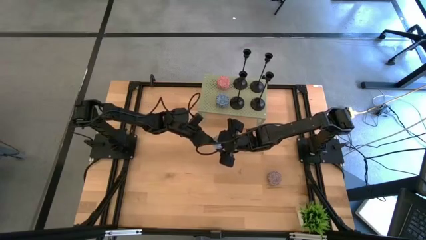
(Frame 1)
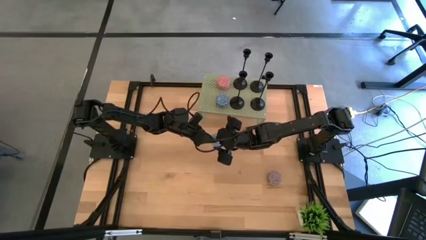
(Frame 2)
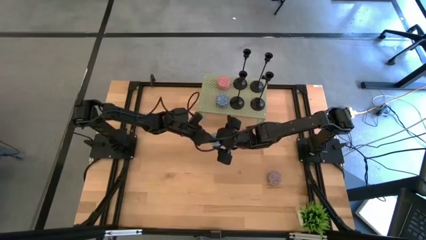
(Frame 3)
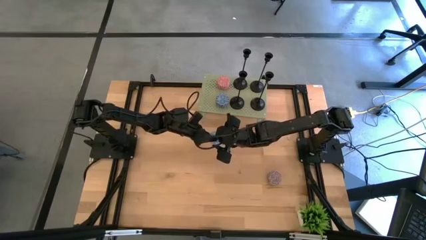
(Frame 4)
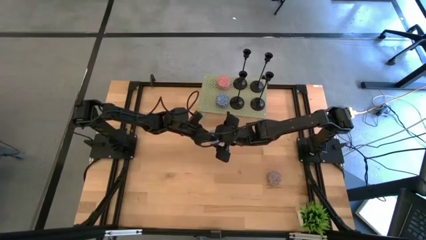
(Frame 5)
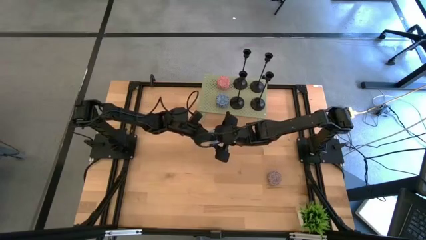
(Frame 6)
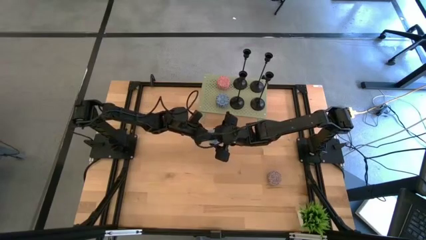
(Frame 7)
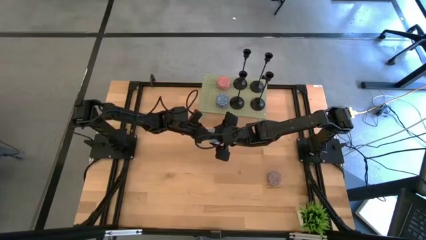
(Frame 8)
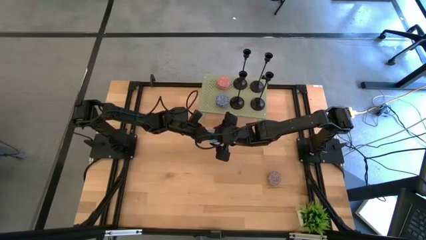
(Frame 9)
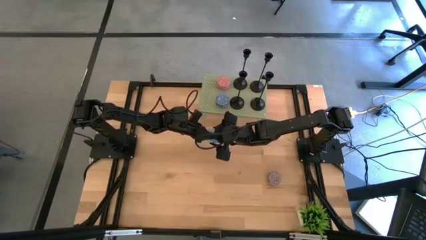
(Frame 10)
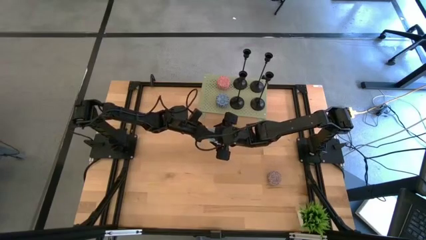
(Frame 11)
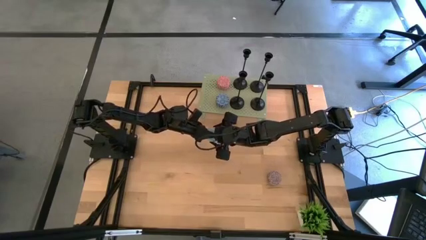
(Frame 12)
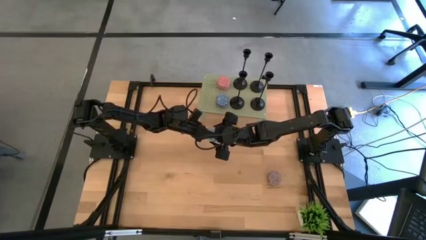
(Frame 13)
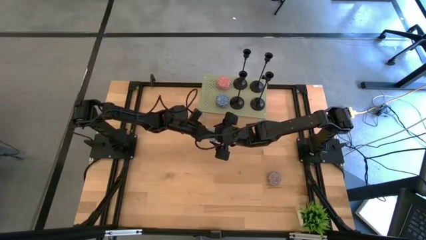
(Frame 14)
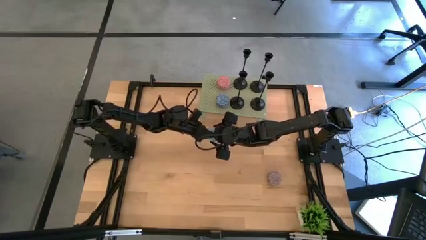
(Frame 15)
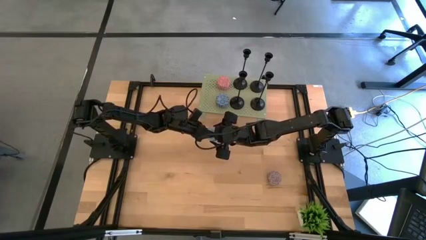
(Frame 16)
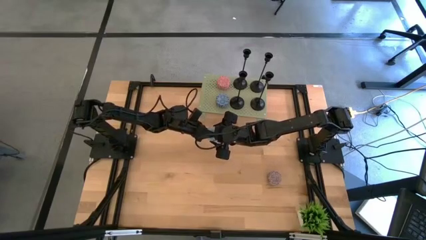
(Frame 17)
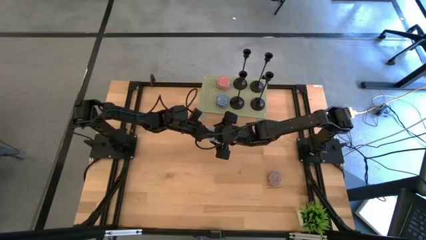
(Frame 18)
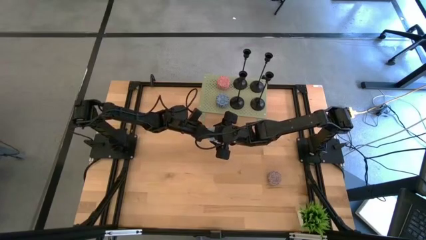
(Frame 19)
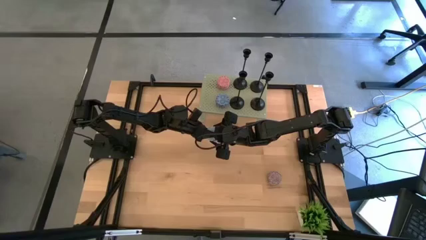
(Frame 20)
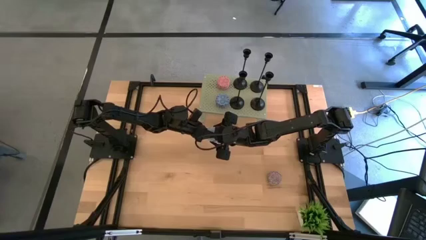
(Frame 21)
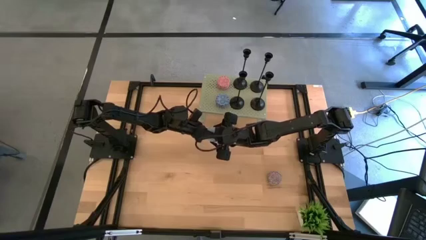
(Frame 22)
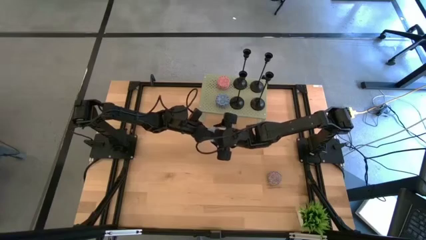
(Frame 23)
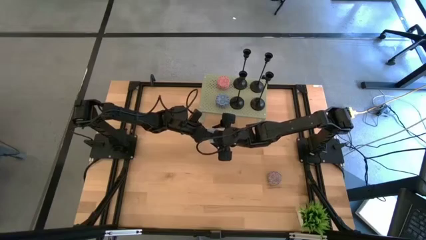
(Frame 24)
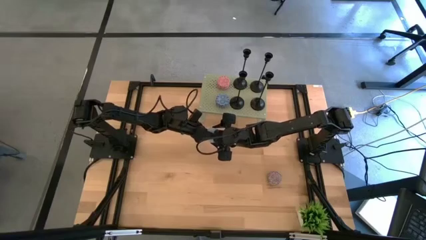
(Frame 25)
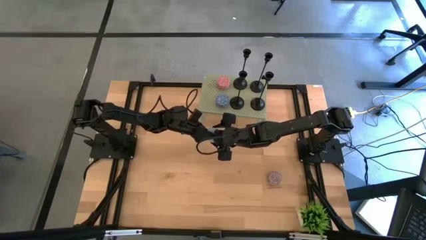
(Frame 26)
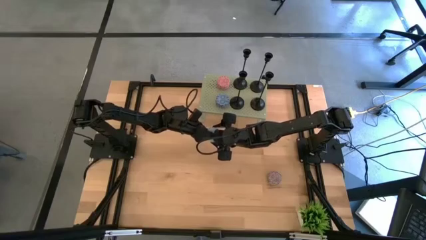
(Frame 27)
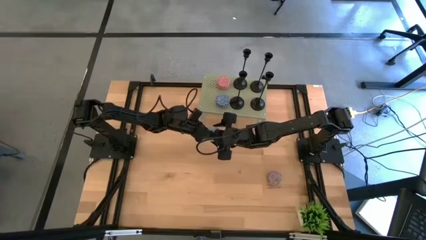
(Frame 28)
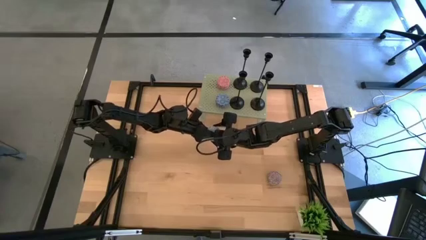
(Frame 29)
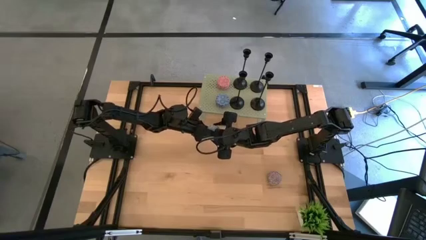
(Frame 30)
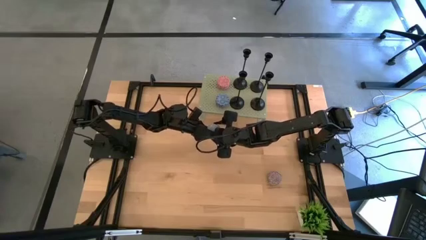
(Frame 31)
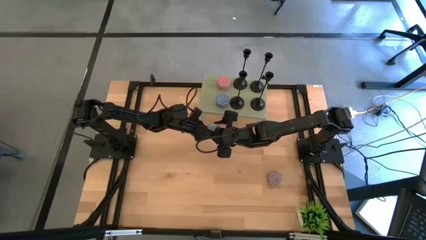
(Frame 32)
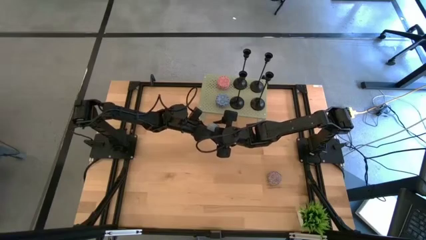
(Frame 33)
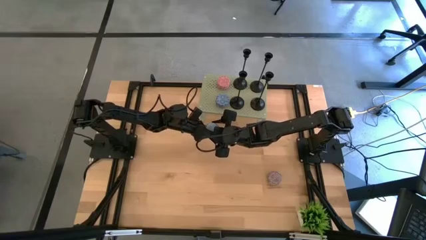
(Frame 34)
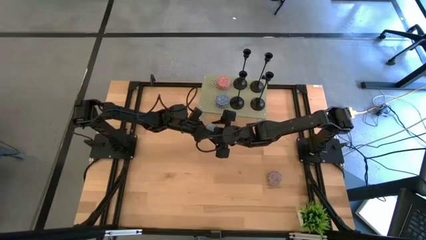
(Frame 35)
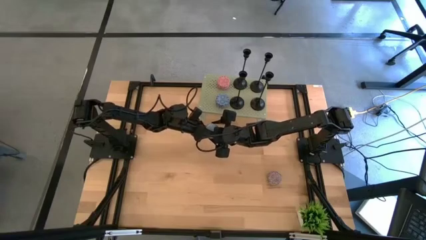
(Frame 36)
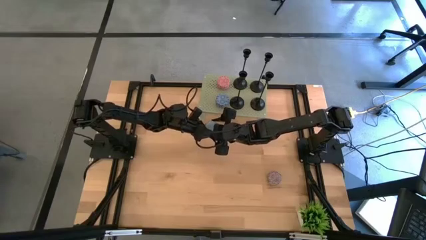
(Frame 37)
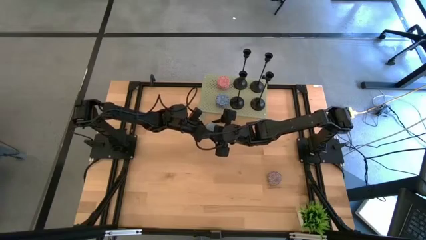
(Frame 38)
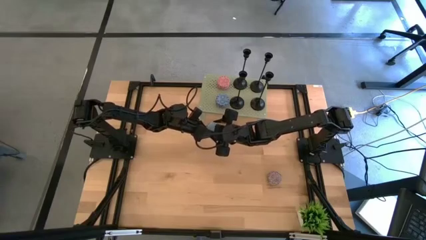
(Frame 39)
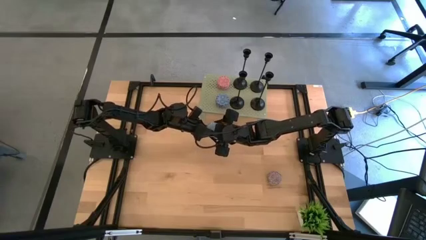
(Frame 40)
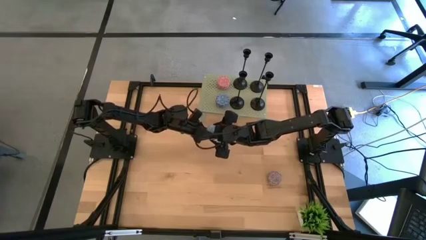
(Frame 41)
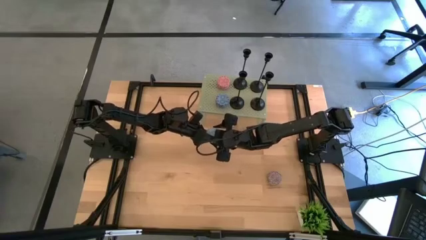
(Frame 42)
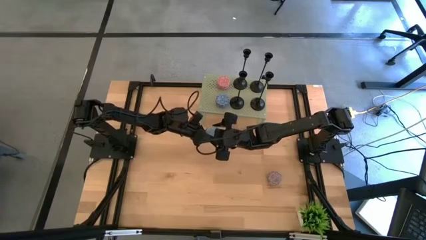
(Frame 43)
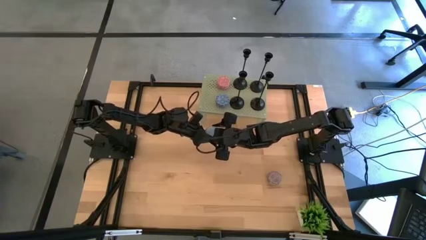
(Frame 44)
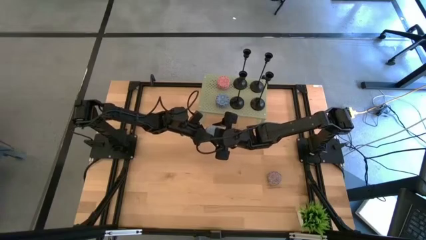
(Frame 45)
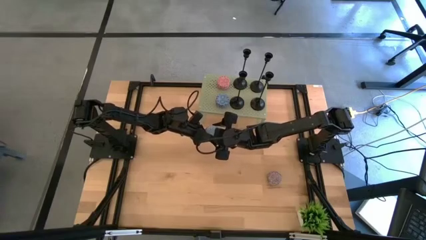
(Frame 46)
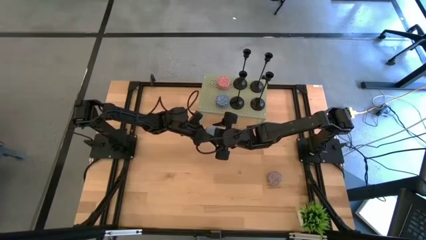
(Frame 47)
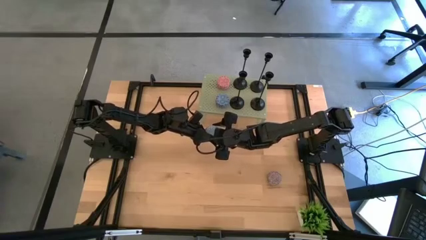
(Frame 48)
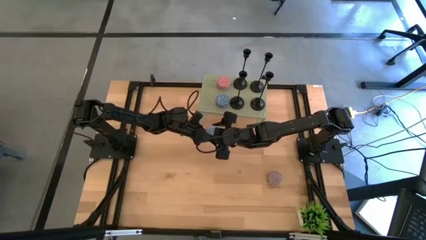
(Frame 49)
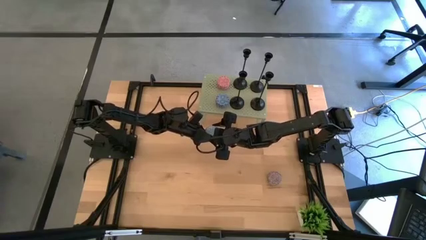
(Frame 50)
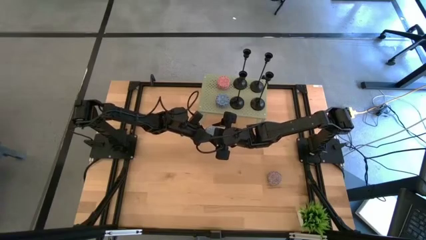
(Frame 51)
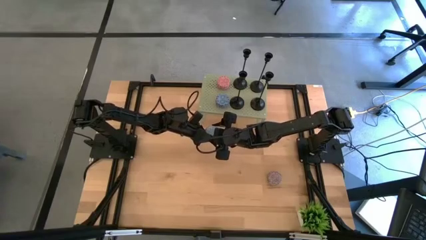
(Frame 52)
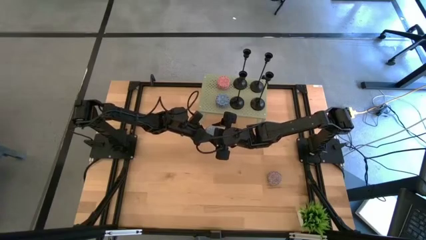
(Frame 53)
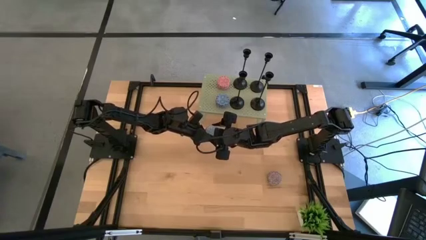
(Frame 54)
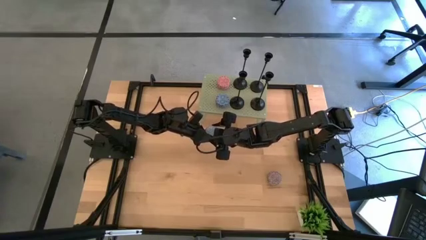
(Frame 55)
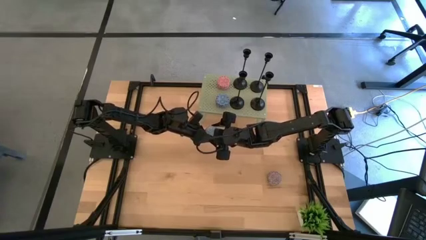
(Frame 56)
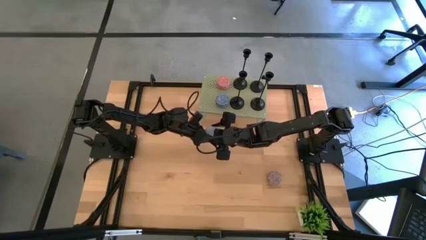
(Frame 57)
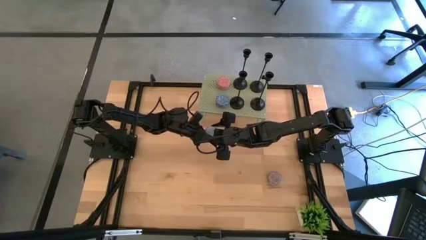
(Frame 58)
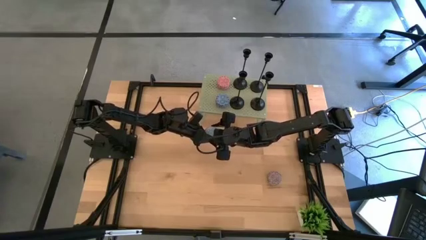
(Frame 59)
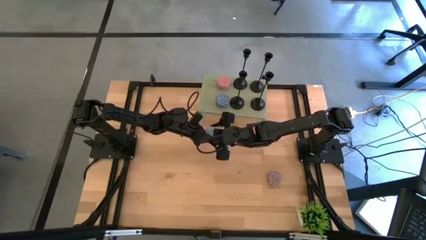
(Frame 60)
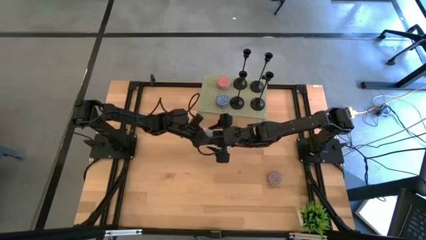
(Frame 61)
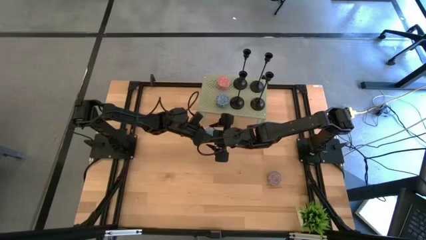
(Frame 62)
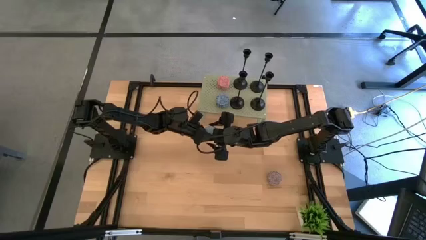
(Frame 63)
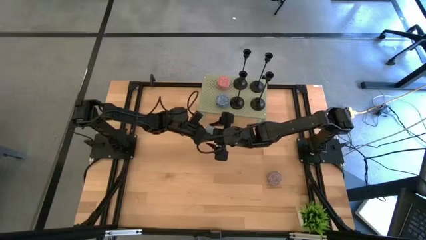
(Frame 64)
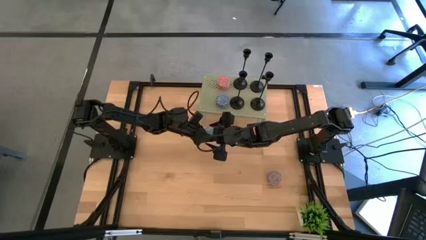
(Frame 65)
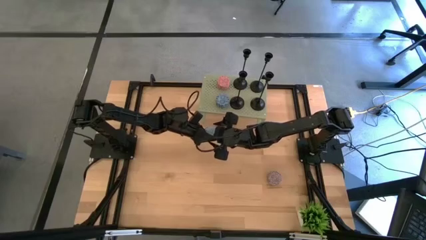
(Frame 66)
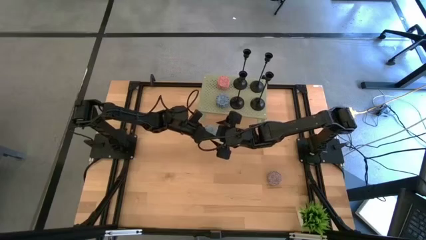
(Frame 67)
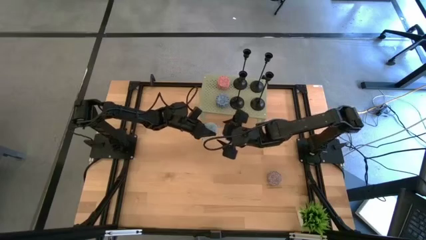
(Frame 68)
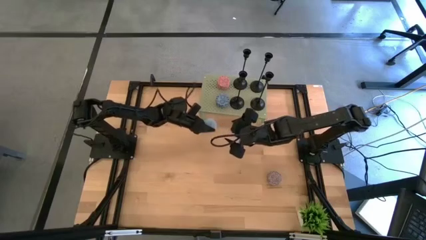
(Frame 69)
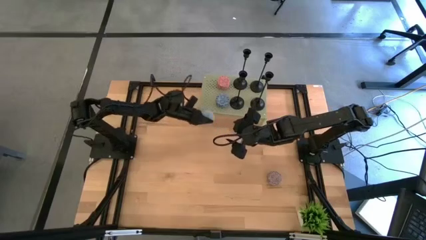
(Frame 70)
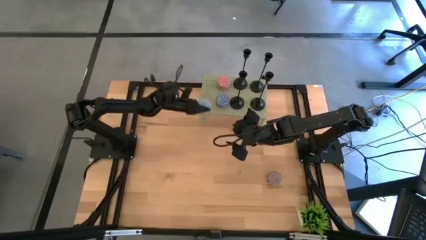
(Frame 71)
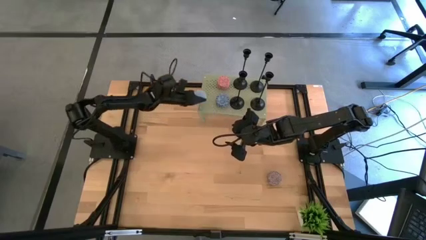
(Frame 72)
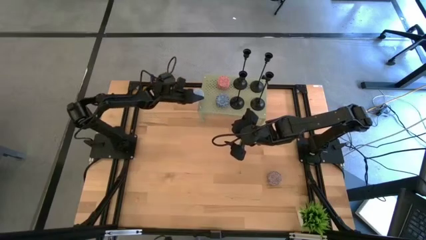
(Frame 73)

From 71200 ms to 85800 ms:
Task: Pick & Place candle stick holders
Put the blue scented candle on the shelf

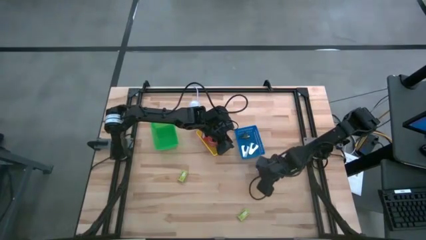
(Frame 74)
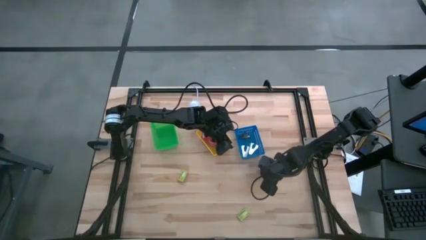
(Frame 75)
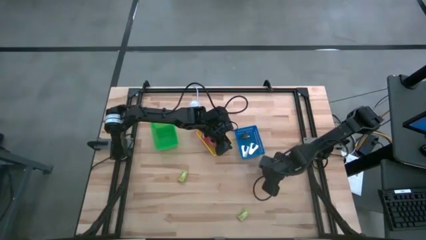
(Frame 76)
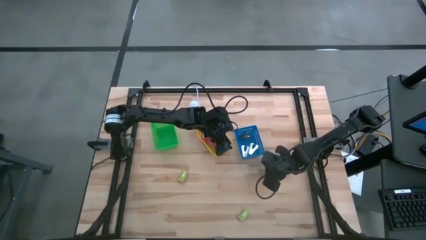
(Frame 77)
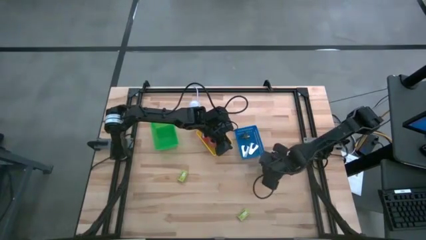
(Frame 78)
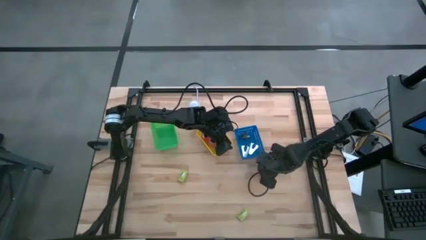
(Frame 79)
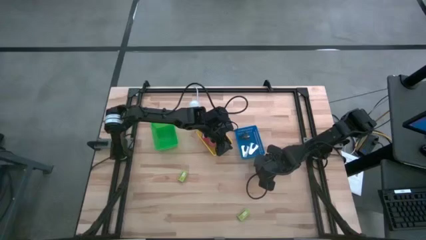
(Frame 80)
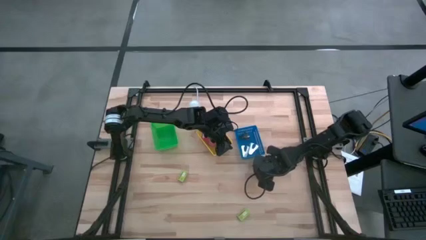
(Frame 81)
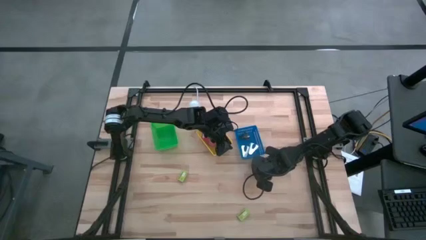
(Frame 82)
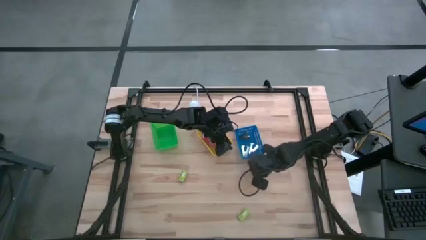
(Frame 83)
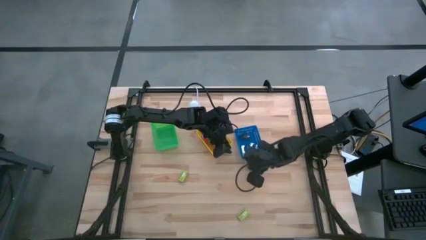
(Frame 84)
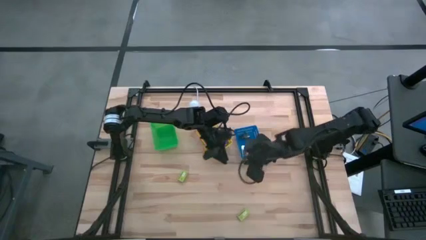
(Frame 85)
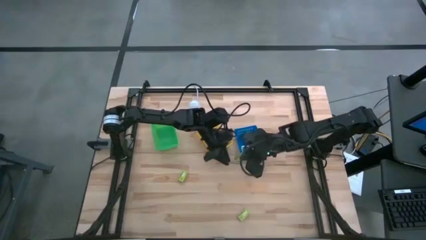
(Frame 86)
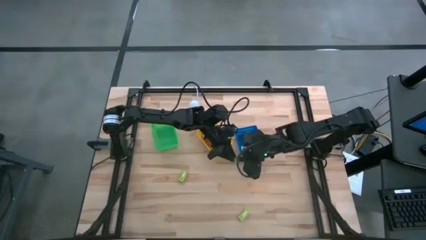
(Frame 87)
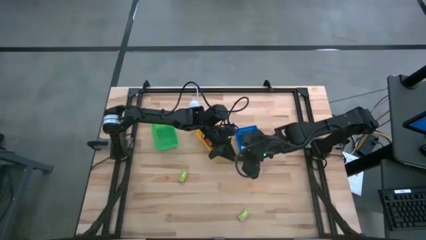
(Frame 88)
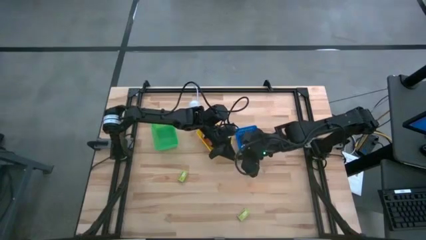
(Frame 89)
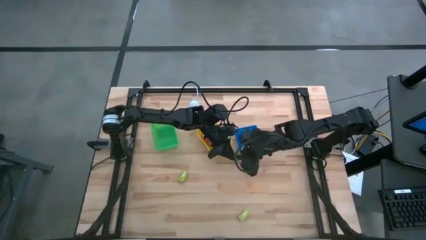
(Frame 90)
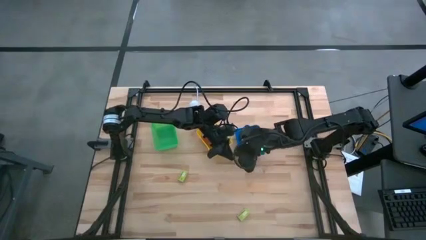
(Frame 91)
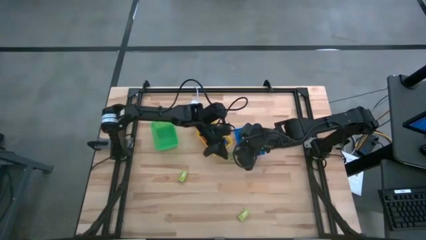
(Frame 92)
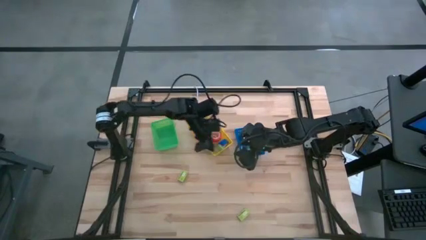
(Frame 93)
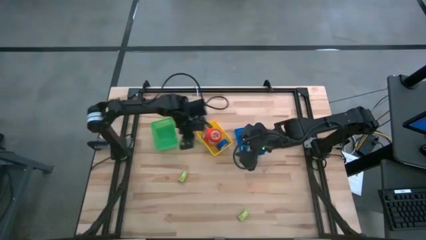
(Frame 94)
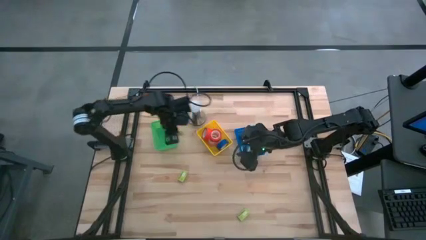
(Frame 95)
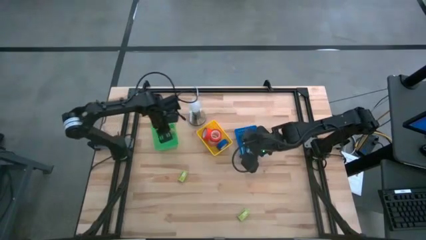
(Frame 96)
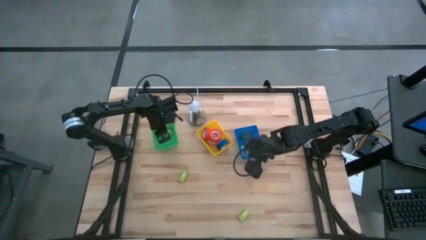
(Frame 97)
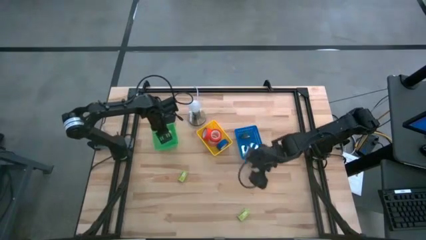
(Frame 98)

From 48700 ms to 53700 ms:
Task: Pick and place Stapler, Stapler remover, tape
Put the top right staple box into the green basket
